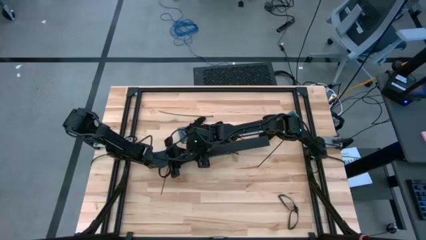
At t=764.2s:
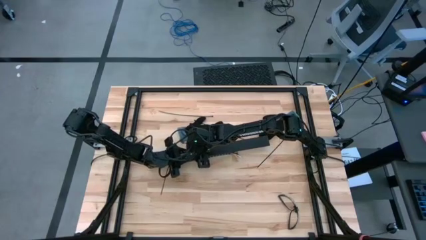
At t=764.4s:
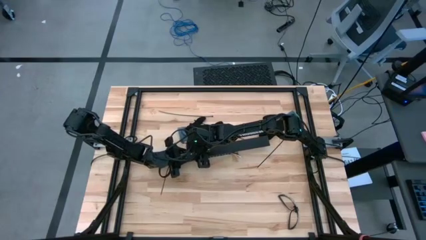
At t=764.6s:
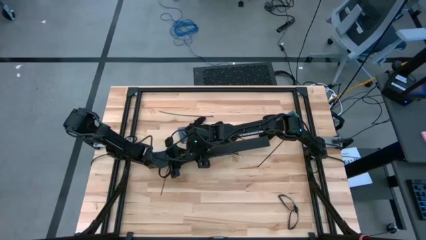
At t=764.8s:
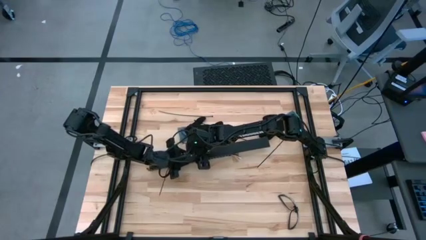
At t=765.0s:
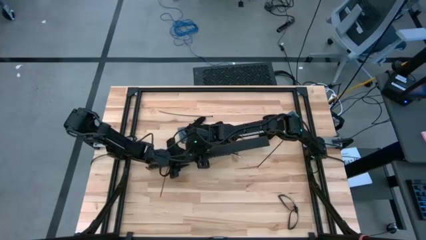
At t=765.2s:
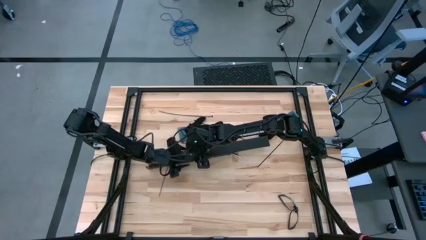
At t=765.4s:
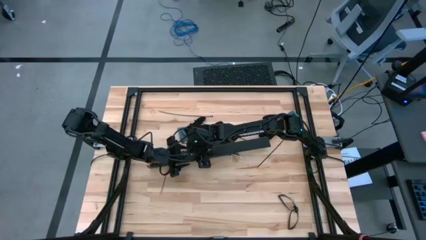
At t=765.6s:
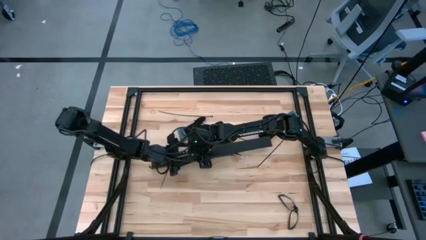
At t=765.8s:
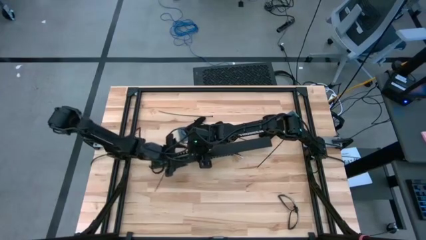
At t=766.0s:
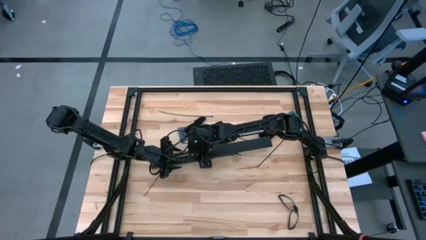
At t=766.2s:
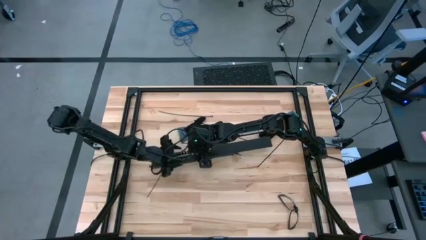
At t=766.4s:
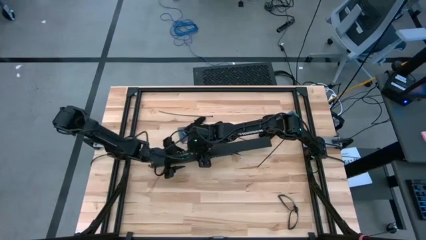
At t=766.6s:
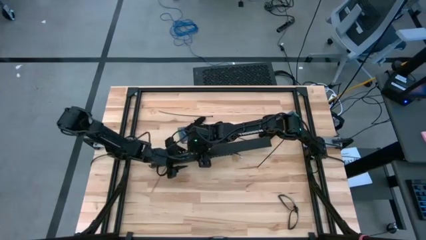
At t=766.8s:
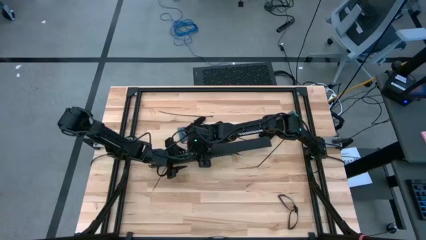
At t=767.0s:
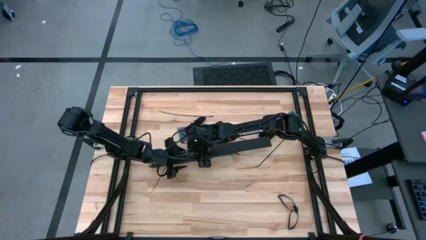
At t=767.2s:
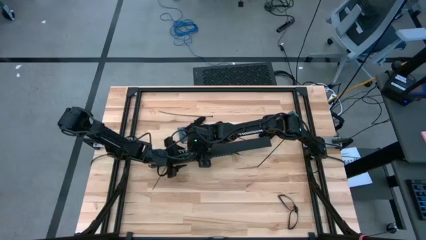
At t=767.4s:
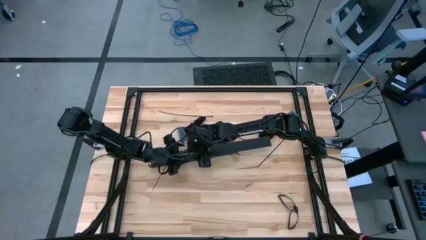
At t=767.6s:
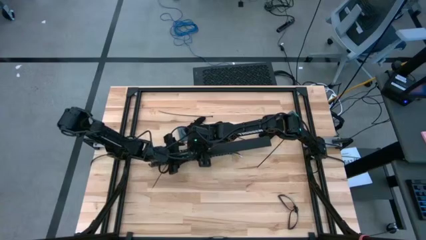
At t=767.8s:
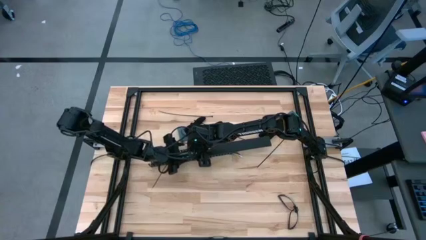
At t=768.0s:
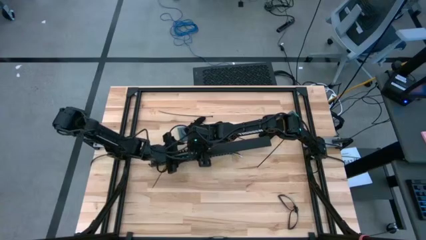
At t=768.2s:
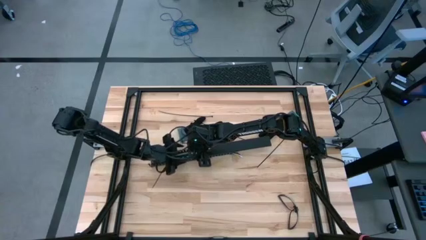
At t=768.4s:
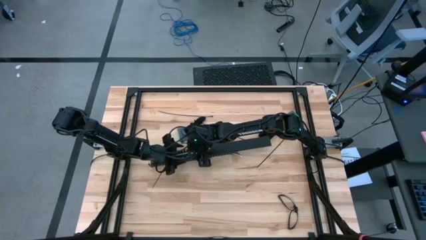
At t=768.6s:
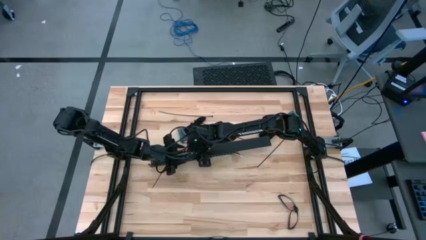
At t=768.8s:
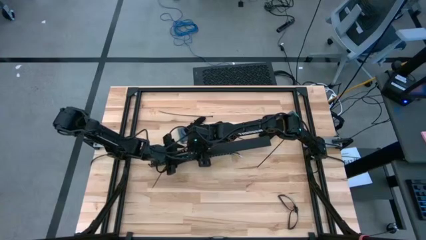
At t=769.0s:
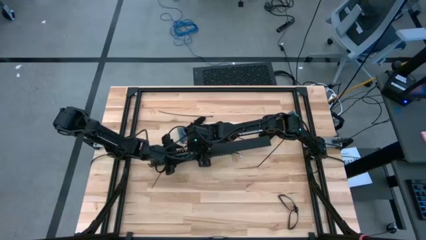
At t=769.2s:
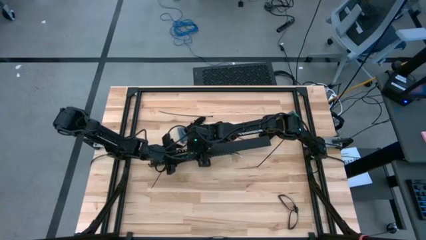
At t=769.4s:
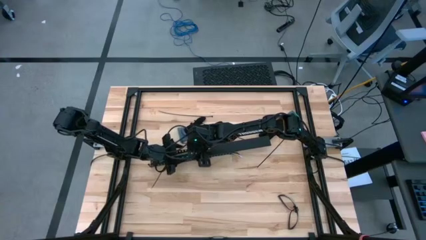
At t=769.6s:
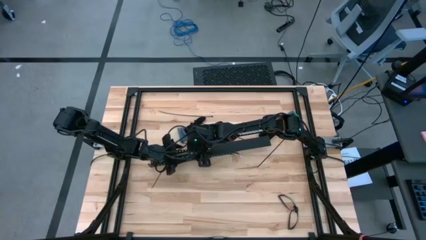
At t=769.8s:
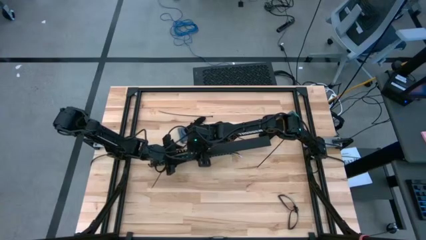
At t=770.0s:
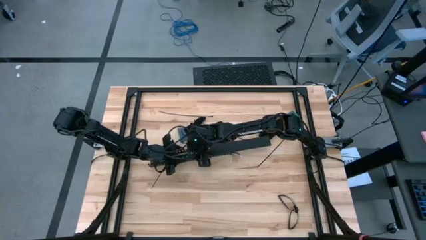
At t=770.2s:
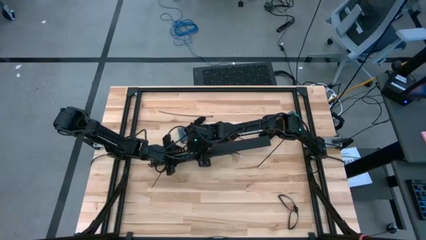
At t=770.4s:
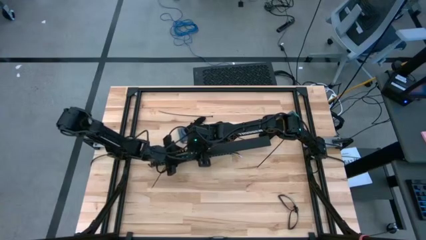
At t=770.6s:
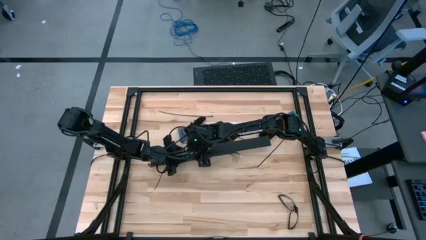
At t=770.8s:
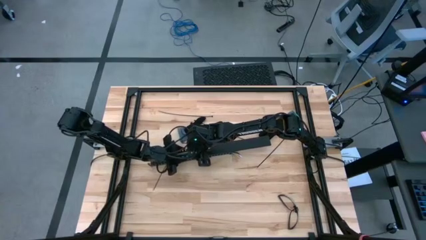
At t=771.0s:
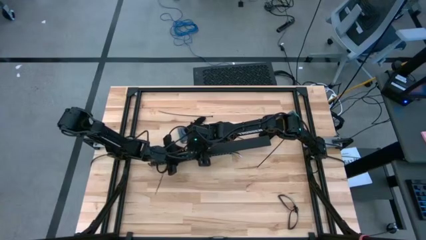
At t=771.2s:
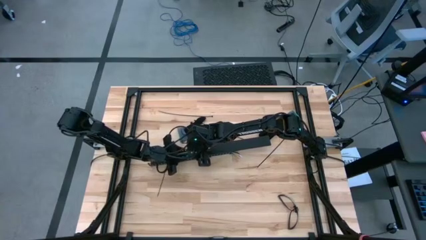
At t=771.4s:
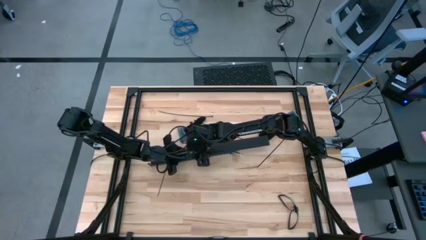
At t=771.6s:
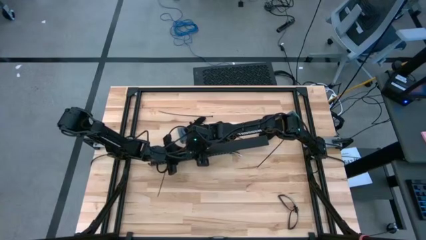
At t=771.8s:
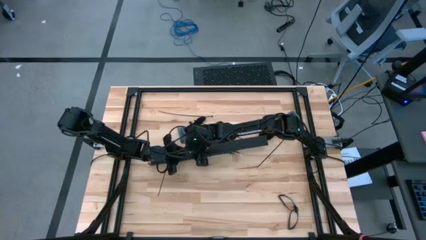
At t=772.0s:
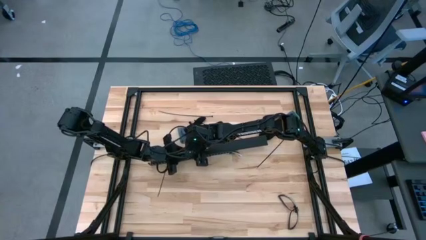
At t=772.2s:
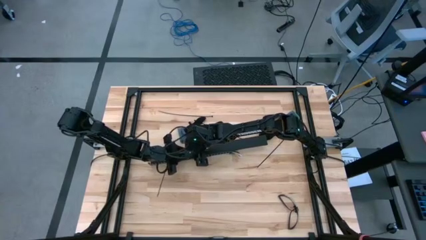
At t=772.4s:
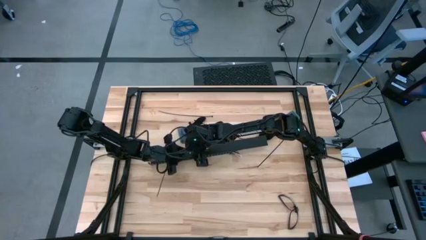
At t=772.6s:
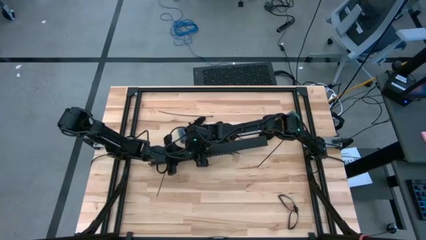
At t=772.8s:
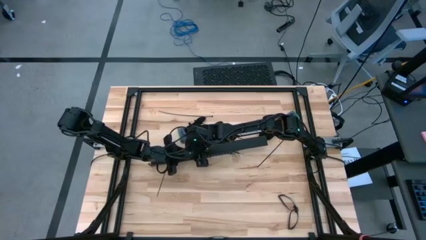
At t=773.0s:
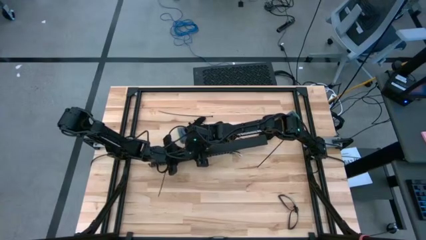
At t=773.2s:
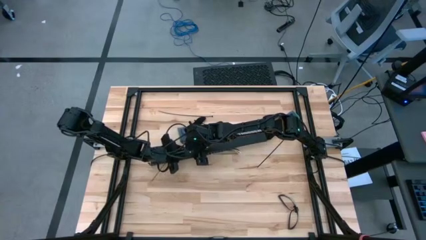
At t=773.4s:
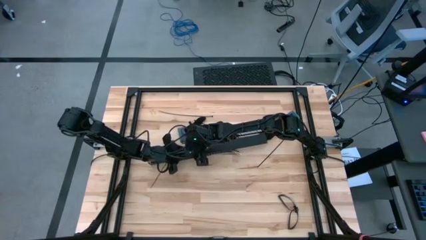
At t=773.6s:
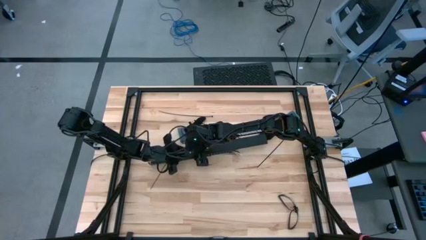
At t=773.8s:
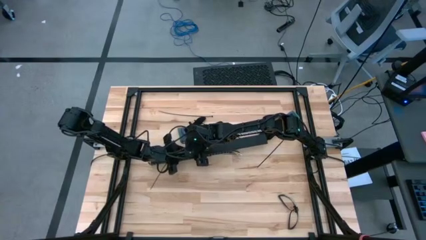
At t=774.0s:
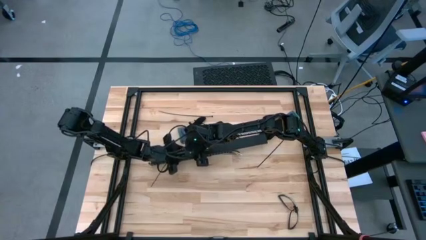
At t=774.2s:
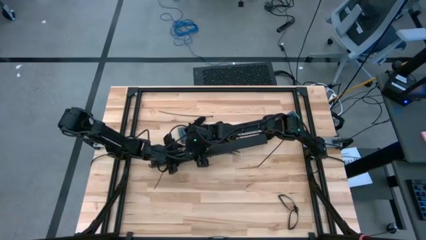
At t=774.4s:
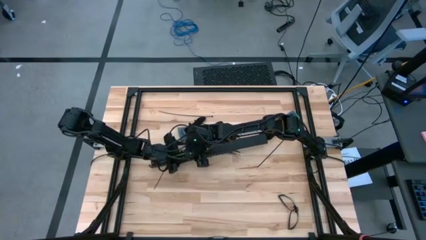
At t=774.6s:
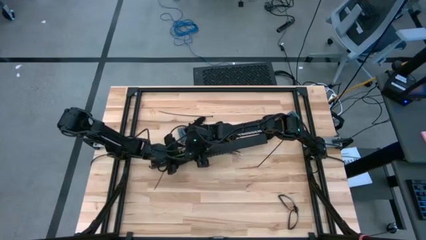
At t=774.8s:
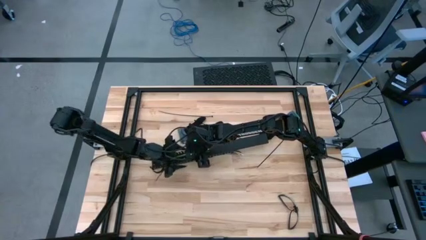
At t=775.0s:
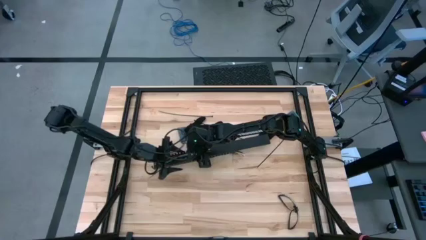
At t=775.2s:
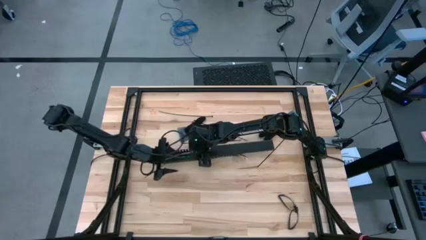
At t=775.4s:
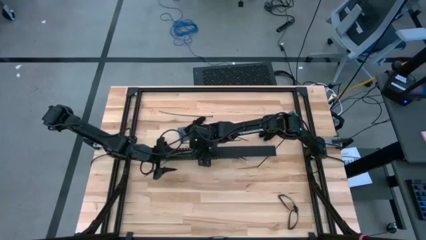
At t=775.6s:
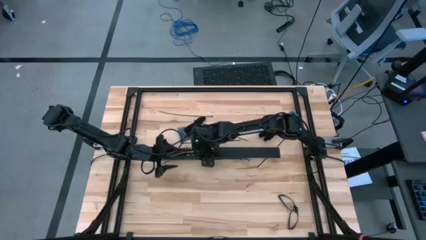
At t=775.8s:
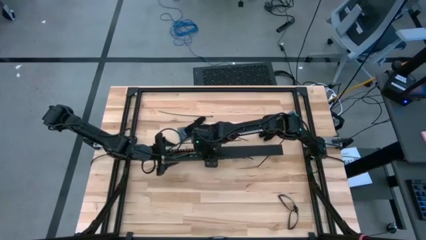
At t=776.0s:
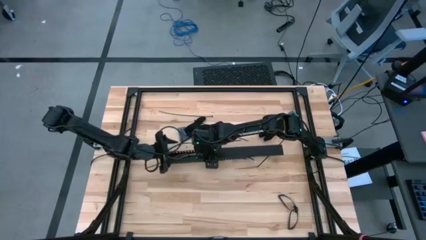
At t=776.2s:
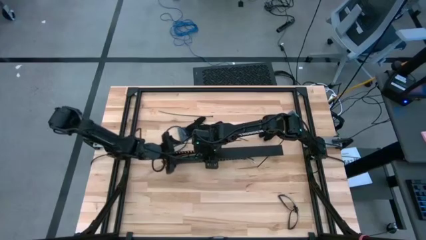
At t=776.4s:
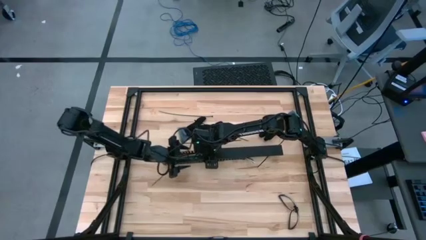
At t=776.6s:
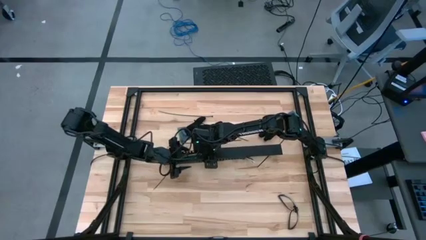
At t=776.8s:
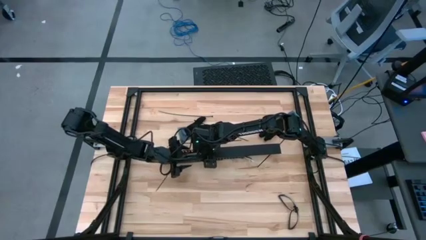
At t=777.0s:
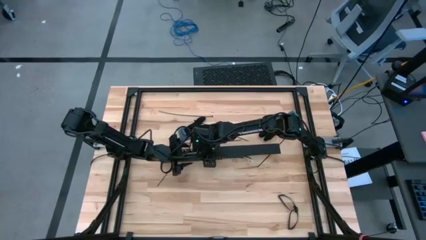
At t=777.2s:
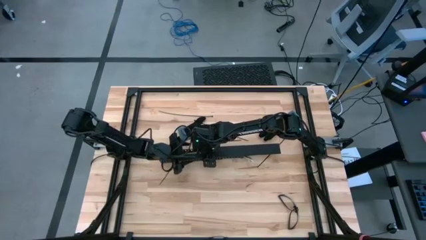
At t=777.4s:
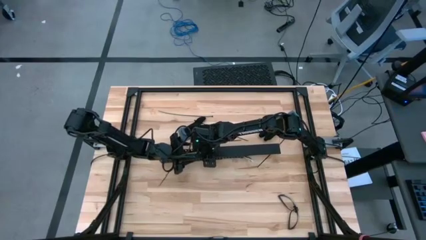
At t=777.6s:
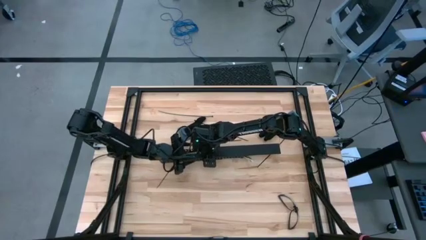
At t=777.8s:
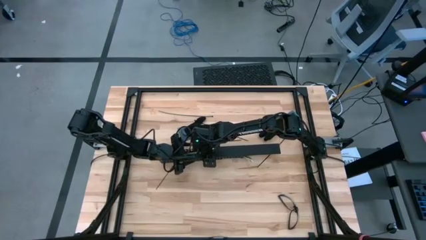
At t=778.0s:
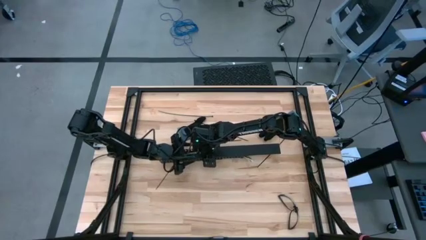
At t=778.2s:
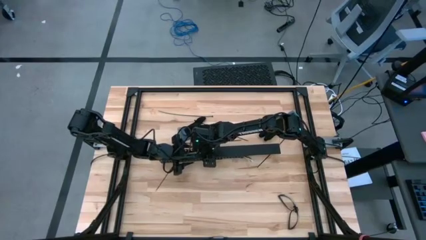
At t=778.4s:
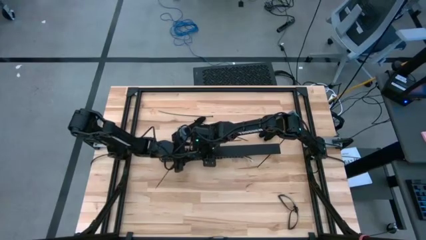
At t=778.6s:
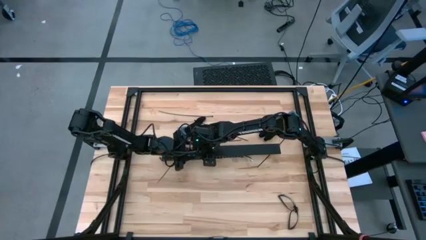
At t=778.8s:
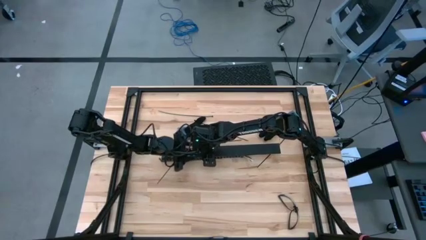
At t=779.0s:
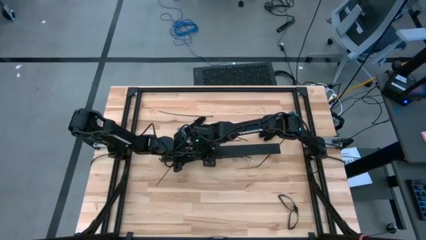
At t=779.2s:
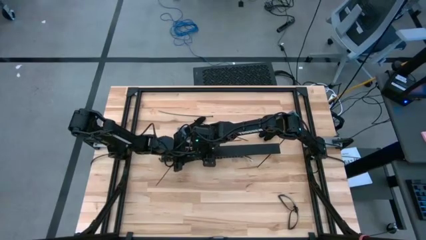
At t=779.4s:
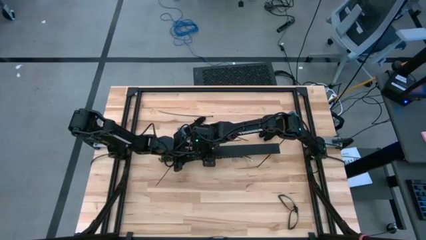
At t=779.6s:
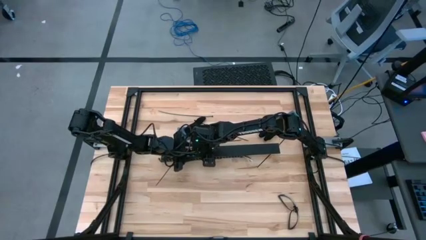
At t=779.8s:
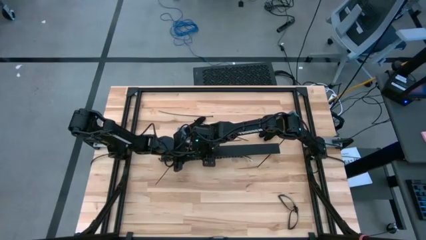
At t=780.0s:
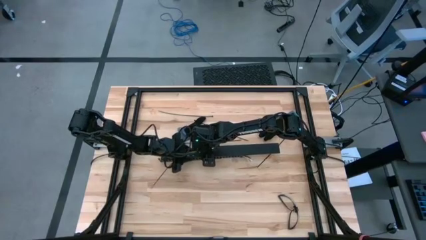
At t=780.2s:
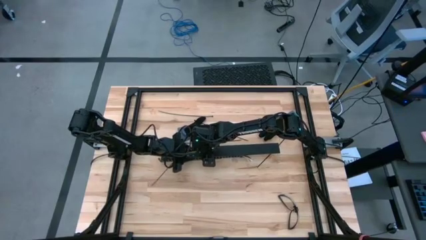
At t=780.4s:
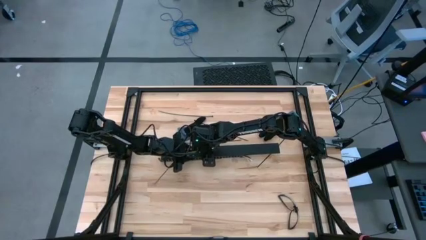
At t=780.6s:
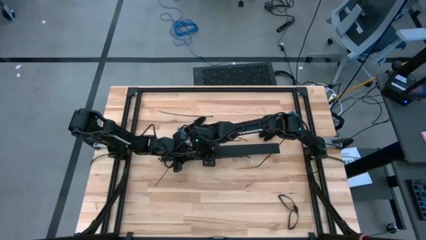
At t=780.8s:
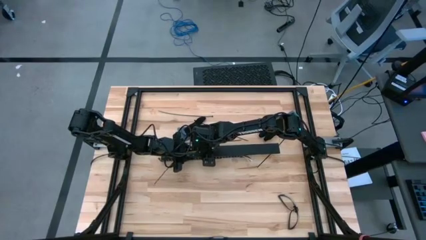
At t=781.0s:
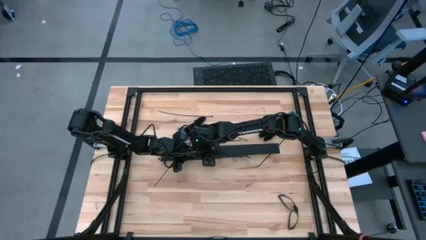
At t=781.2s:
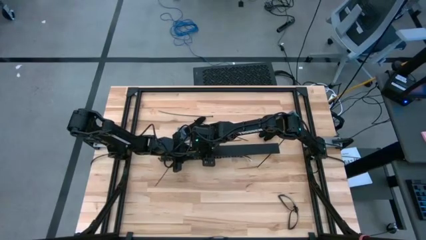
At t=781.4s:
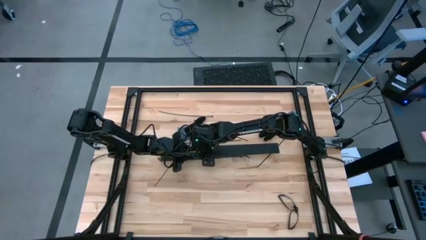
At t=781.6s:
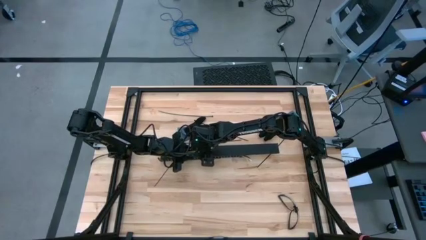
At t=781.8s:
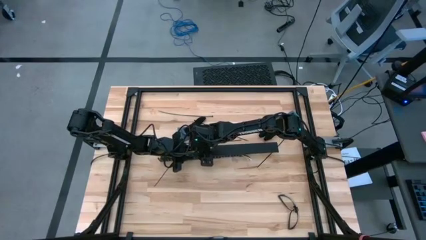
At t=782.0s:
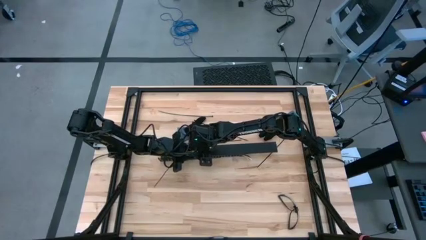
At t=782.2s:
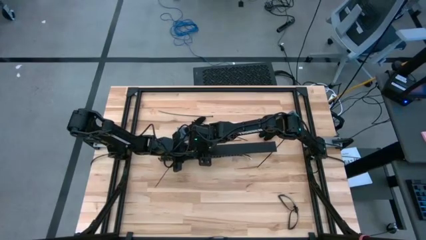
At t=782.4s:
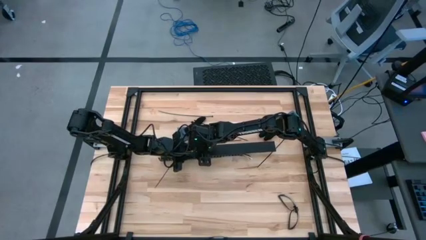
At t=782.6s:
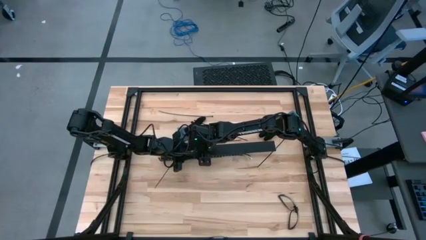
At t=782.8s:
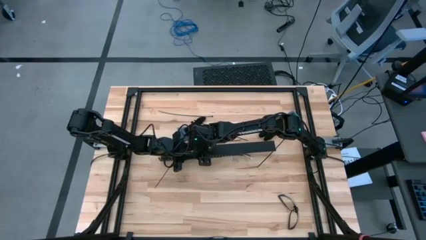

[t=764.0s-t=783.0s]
Task: Ziptie cables
Close the cable duct
